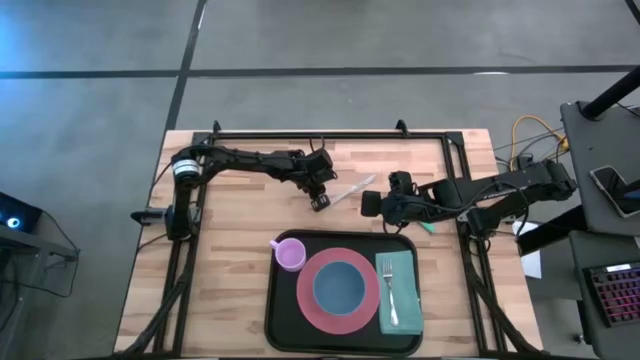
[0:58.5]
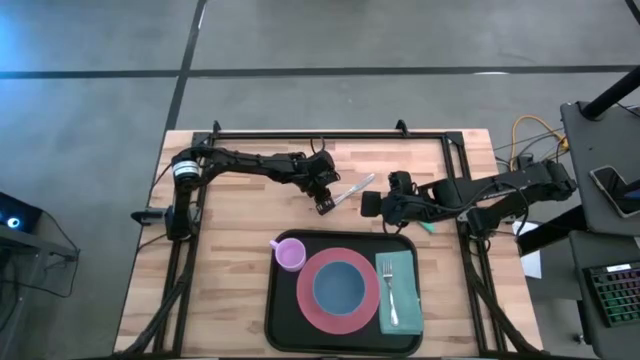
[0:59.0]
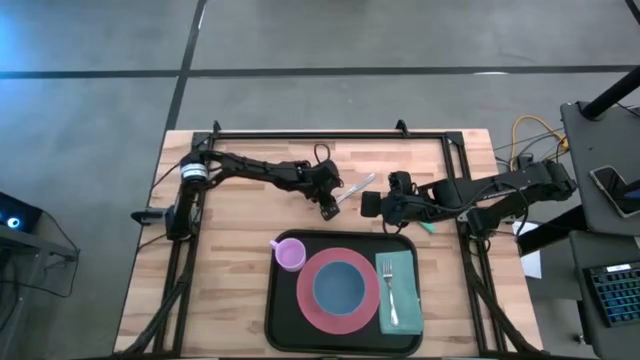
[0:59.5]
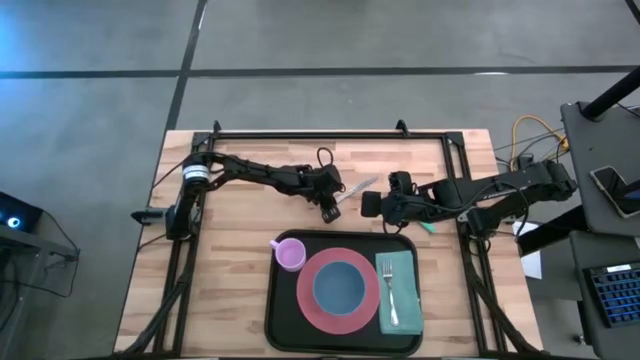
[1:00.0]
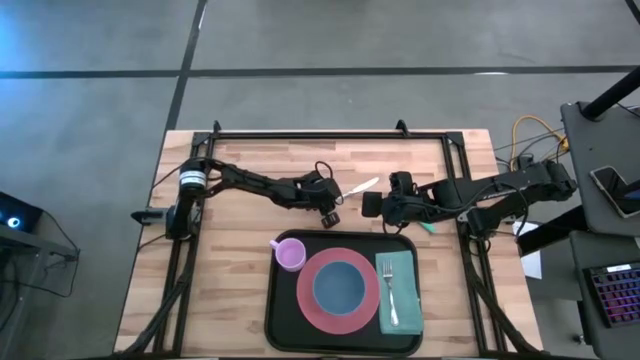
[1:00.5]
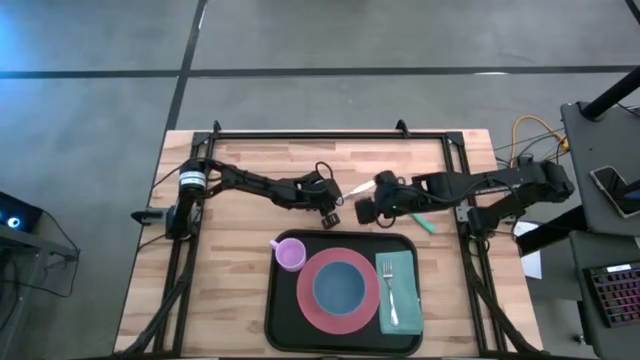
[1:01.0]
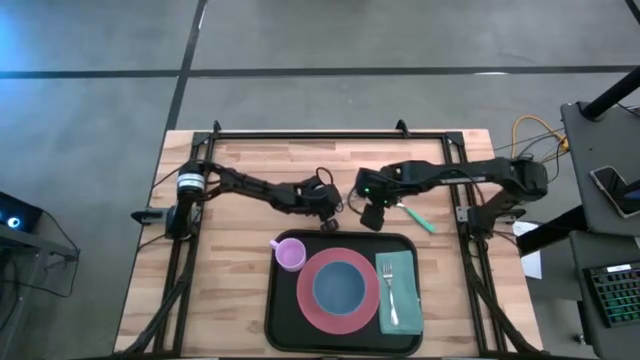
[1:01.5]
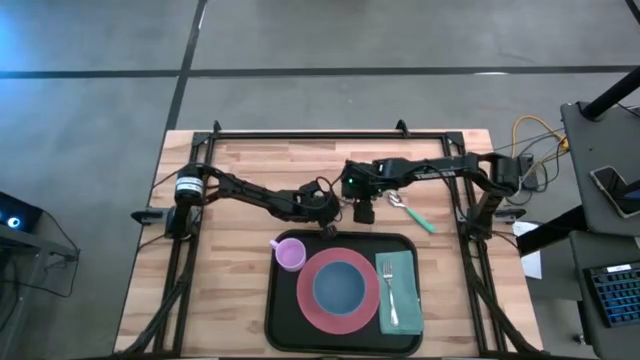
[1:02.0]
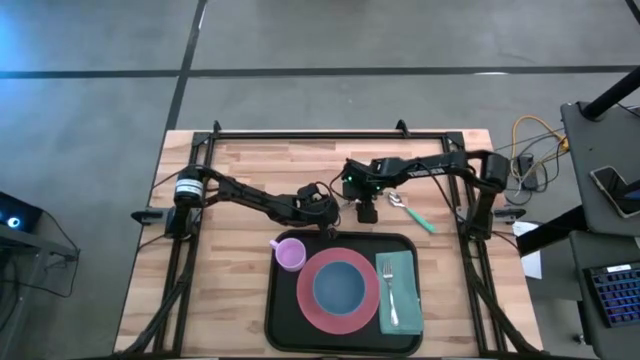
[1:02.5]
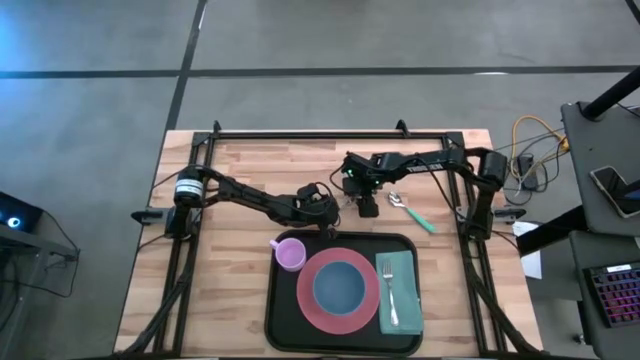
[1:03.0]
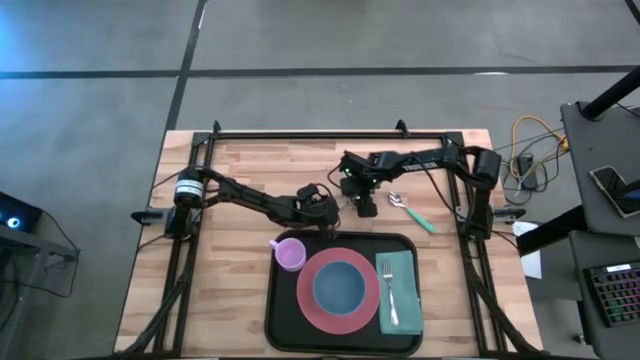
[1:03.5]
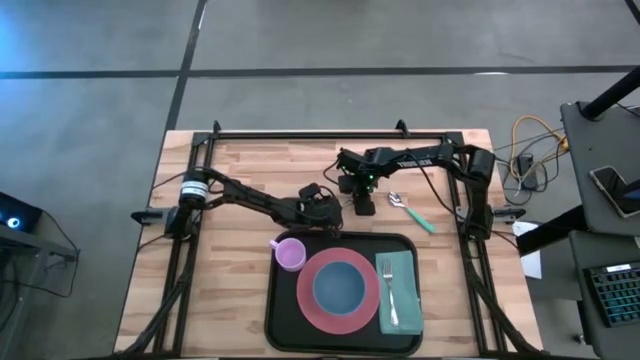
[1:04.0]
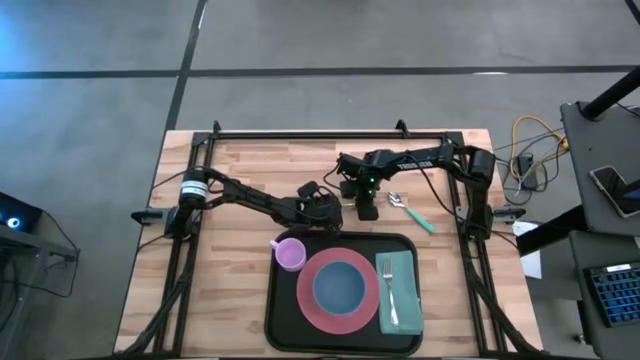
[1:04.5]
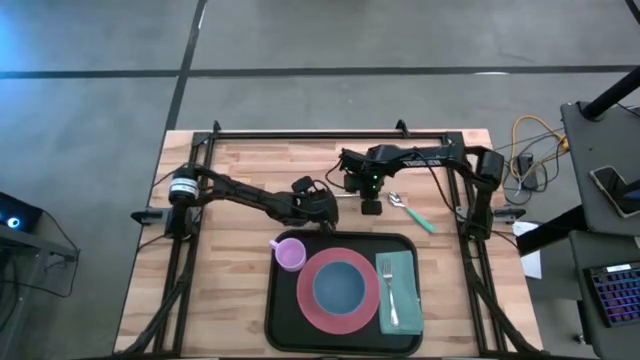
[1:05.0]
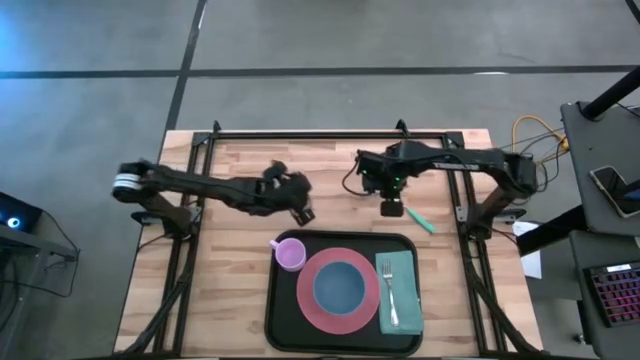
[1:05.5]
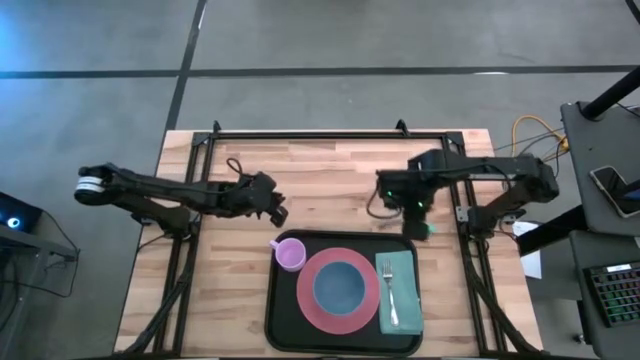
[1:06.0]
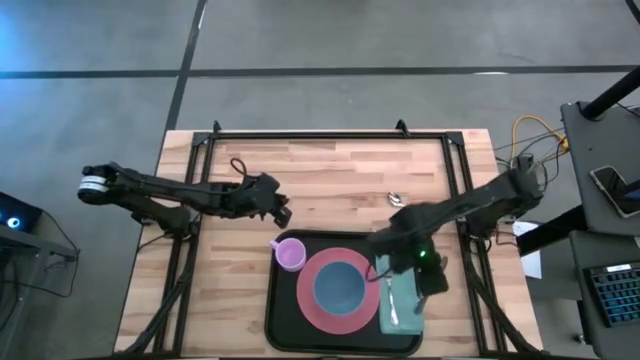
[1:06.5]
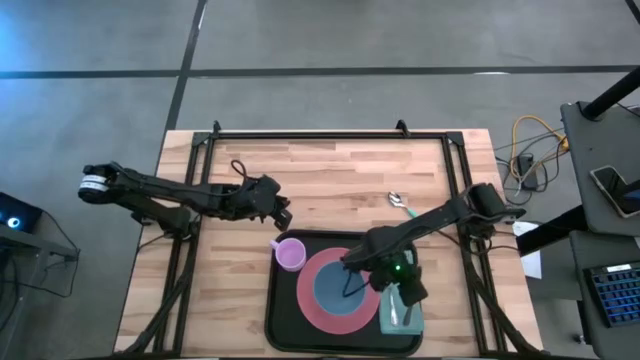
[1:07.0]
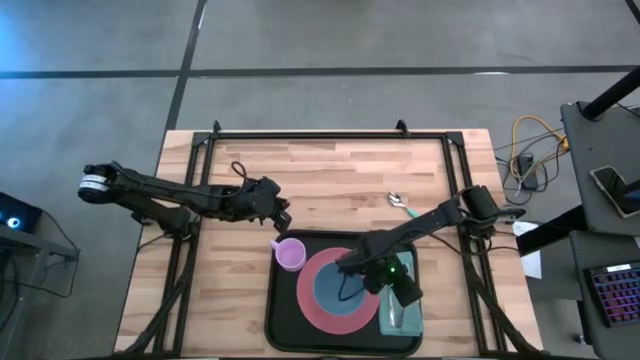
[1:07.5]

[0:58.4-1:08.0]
Task: Set up tray
Put the silver knife to the right of the silver fork on the blue table napkin on the black tray

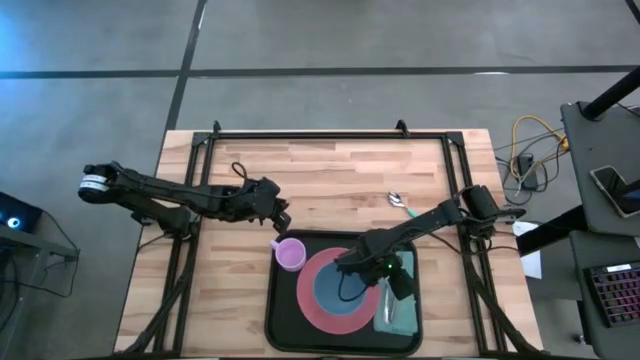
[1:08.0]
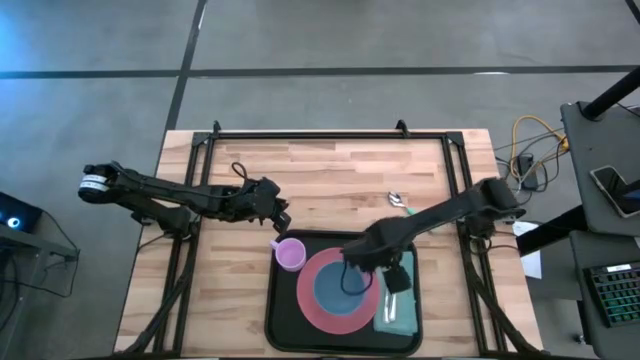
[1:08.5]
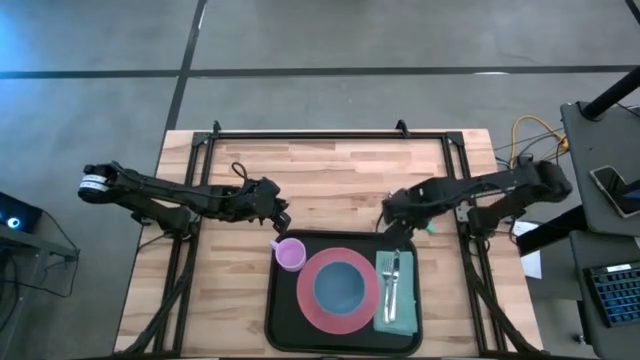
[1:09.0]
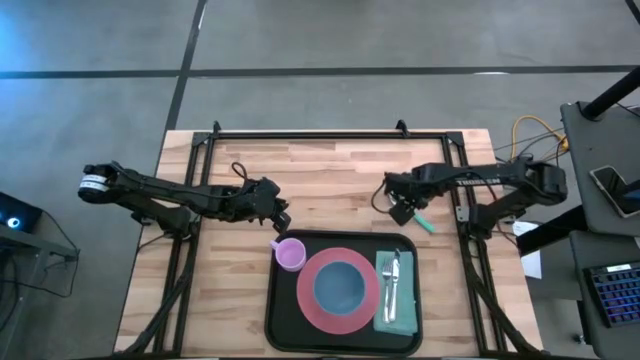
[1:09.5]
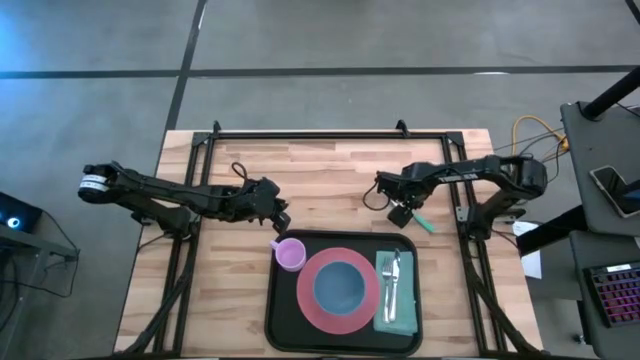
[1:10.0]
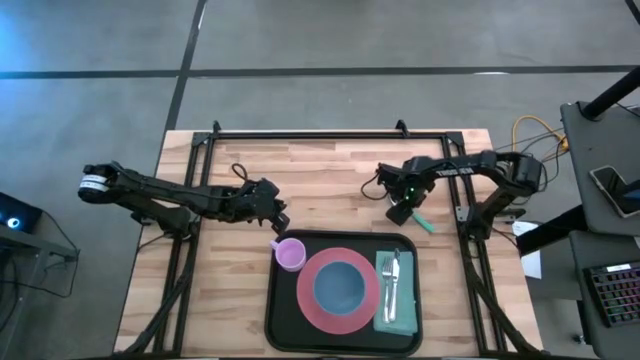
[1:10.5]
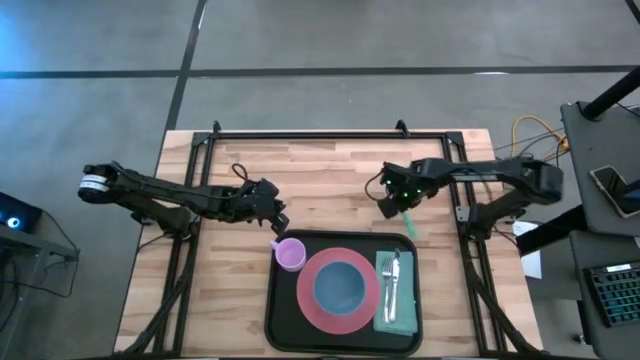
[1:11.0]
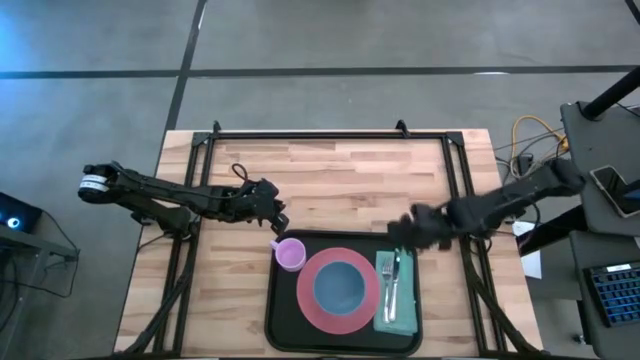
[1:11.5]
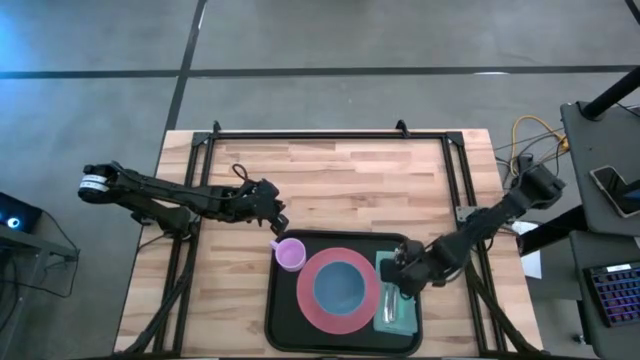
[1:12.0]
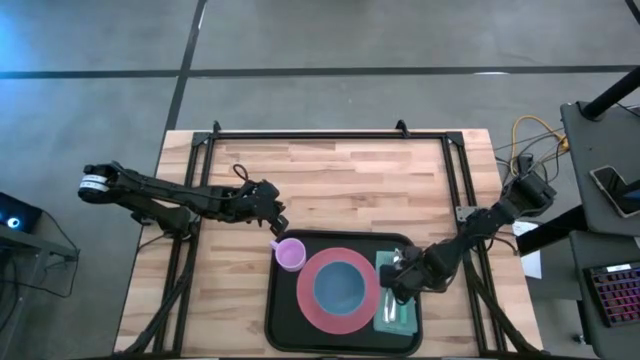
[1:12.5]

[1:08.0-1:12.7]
Put the green spoon to the right of the silver knife on the blue table napkin on the black tray

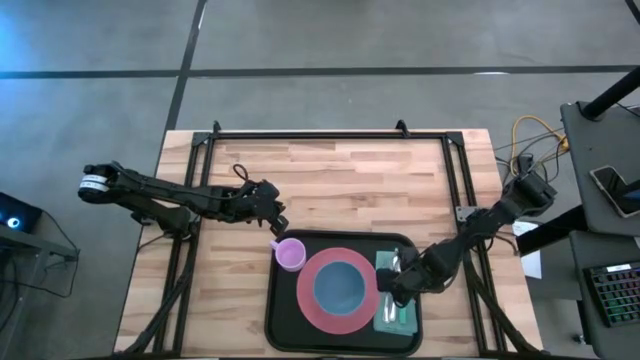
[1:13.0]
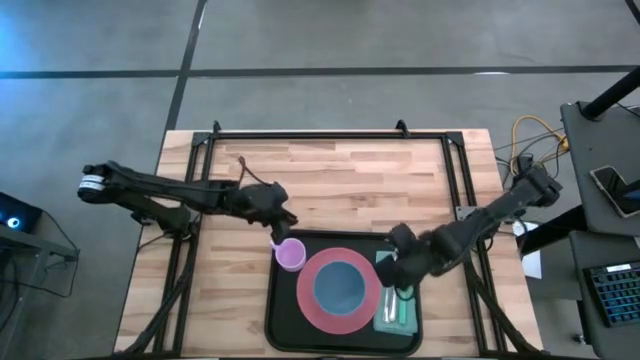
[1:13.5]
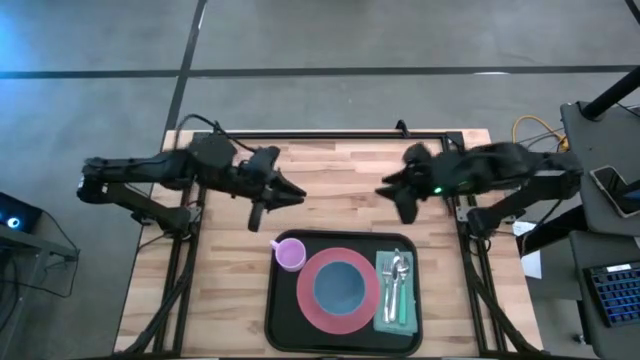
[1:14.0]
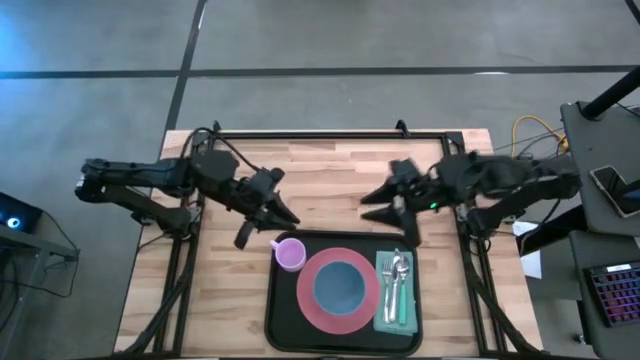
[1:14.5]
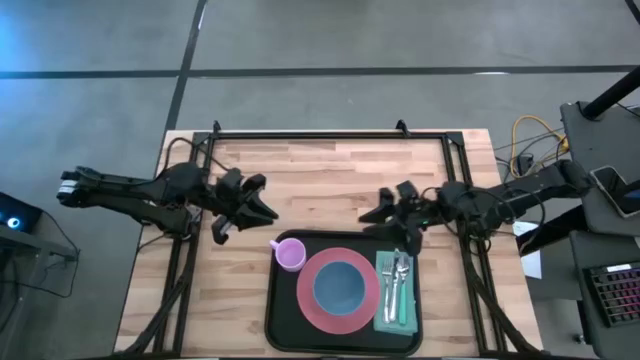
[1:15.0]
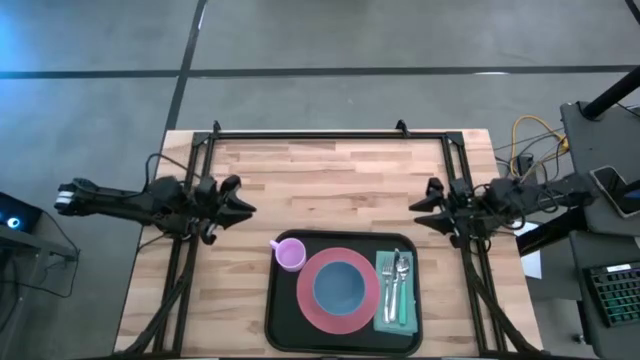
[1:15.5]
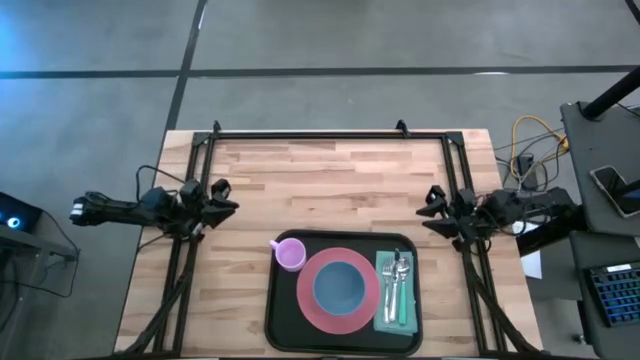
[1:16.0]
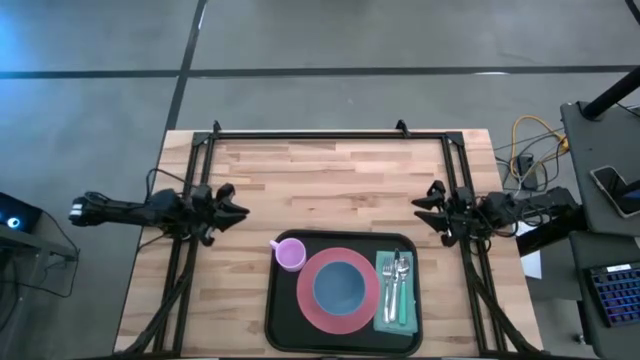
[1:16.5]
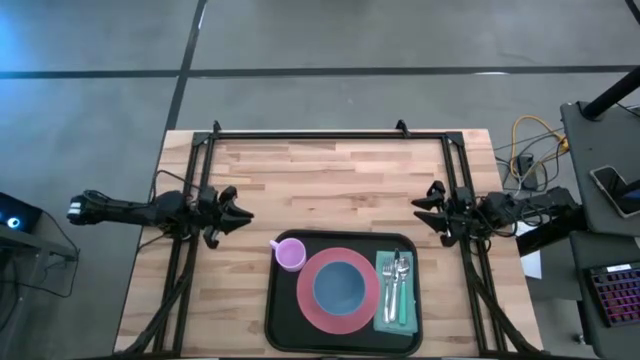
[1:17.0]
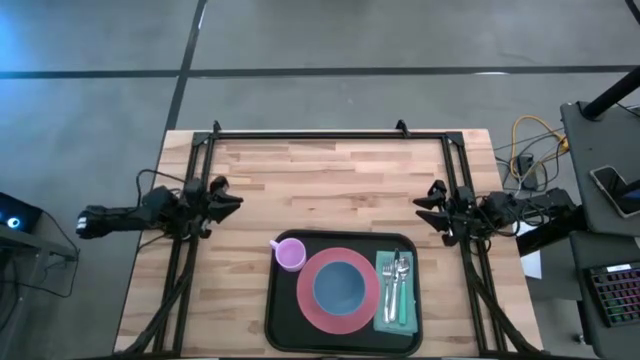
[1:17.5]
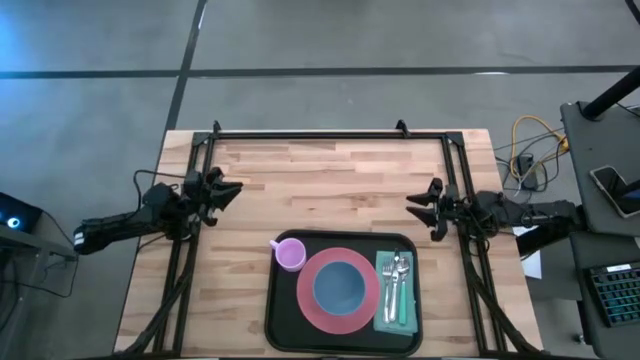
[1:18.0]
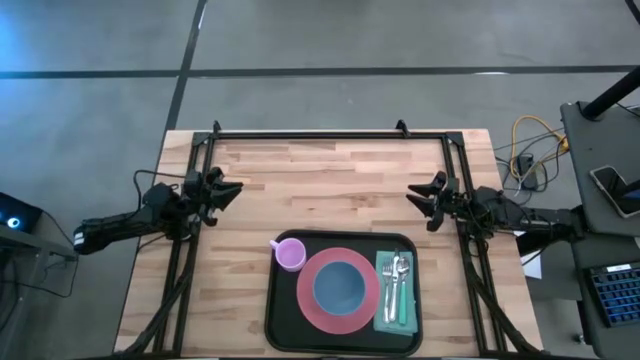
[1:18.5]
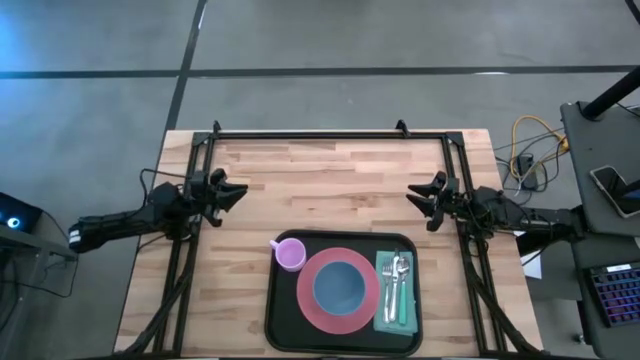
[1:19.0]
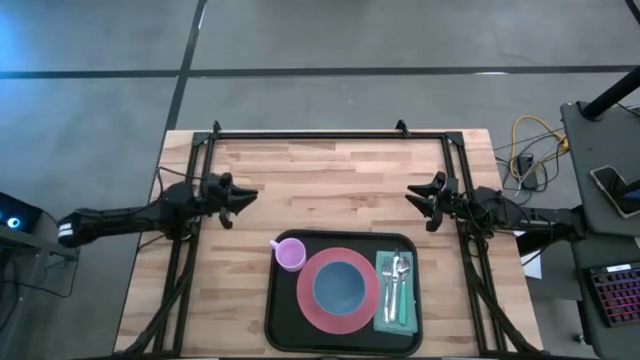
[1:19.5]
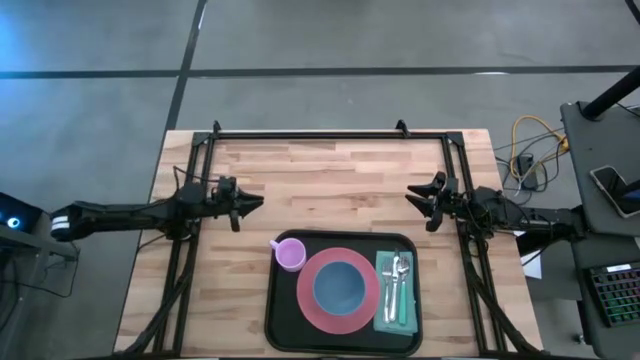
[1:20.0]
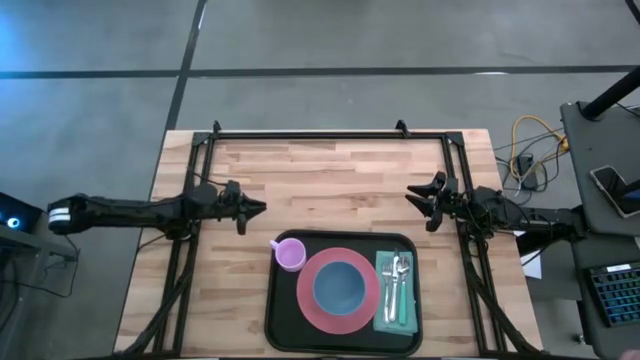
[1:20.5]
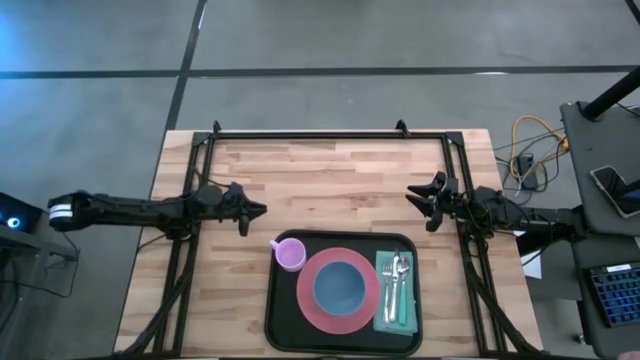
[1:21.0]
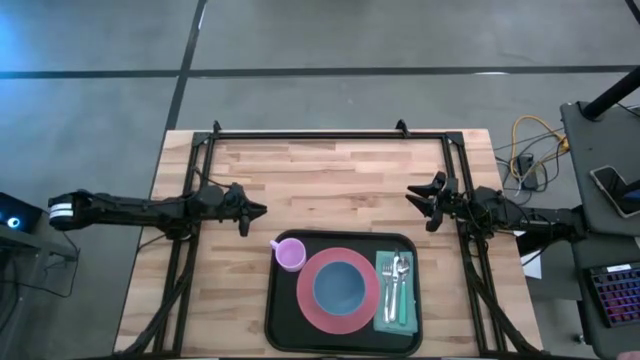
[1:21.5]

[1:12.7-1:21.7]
Return to Home Position
